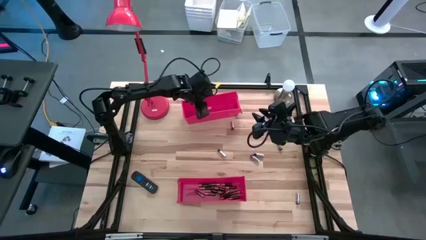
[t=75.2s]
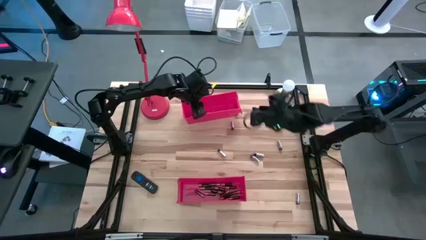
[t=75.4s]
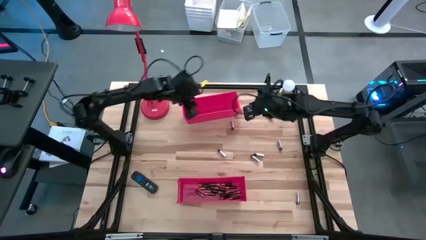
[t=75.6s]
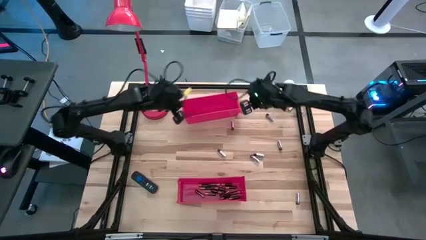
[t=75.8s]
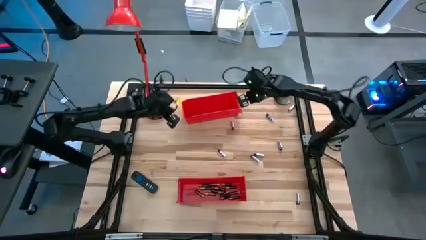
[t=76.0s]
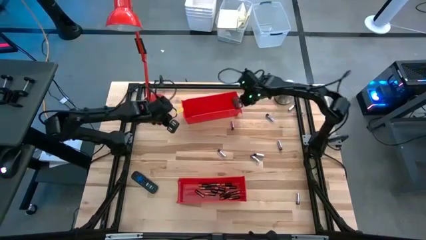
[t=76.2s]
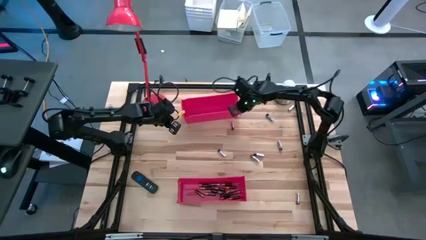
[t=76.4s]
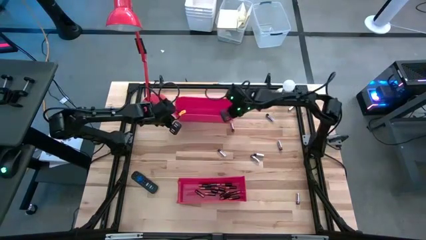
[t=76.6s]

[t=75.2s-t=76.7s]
Task: Sort batteries
Adjust the top red bin

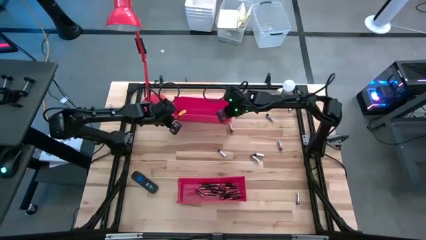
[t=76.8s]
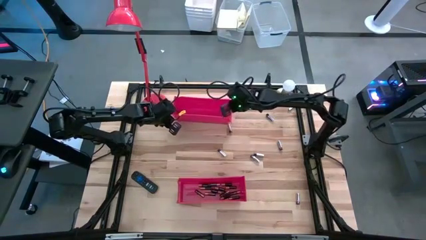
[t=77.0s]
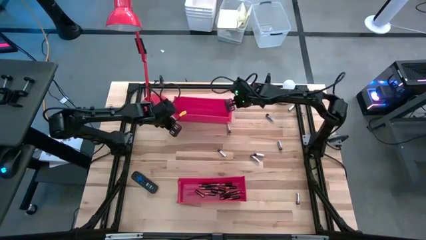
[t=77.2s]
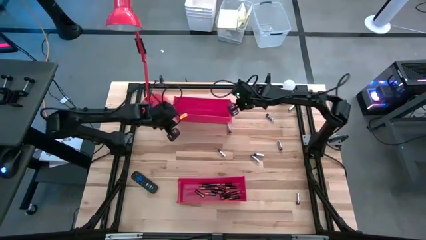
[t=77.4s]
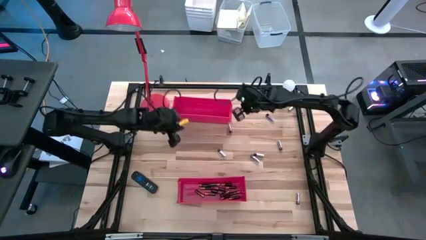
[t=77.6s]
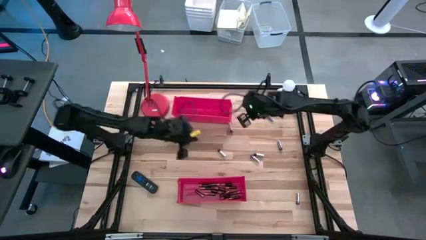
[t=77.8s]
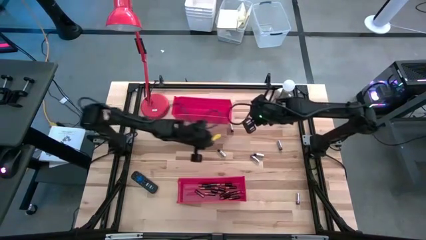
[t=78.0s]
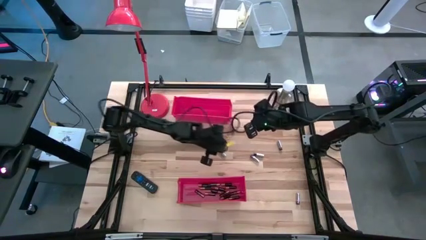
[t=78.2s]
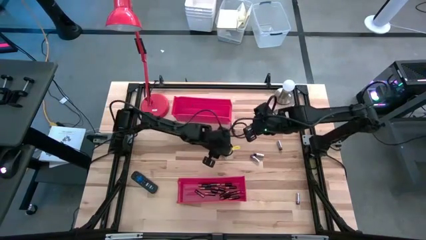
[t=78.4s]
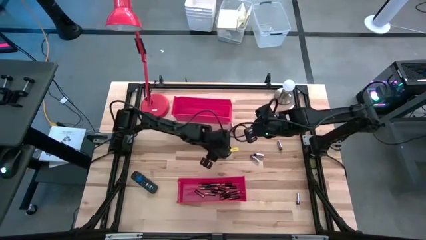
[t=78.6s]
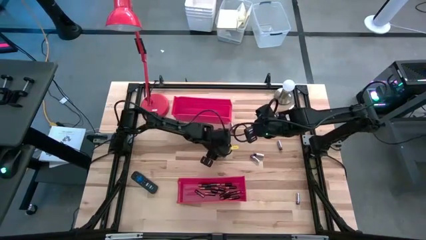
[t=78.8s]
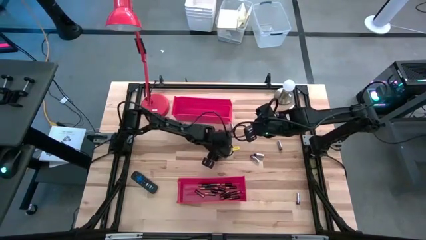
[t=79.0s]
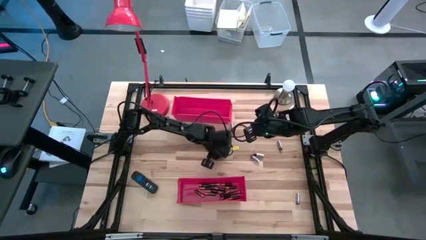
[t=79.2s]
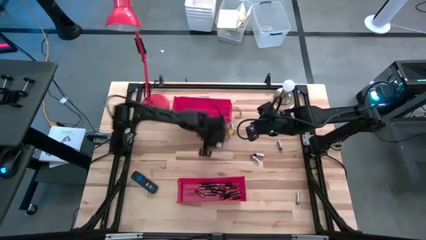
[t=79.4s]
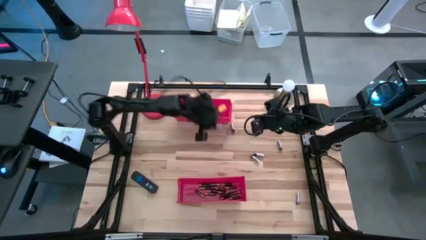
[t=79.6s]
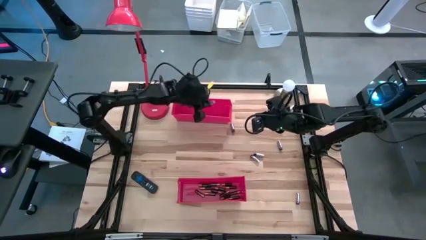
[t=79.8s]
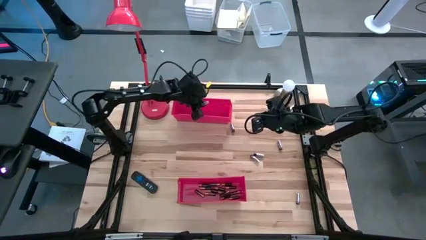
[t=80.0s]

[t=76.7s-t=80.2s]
Put the silver battery into the top red bin

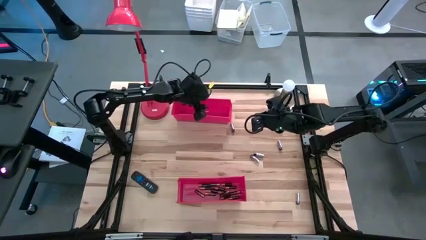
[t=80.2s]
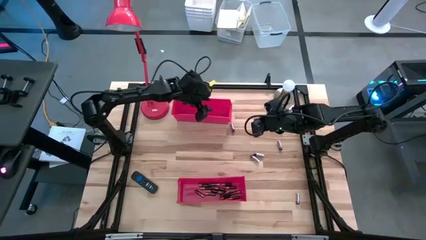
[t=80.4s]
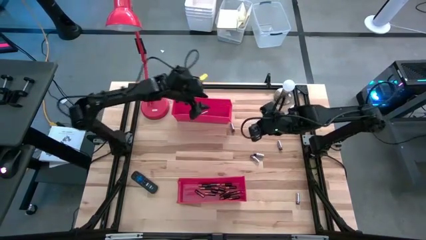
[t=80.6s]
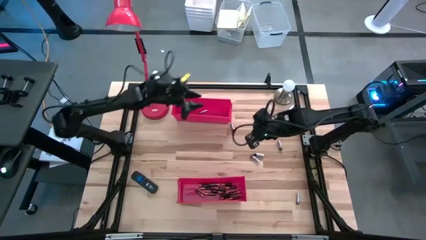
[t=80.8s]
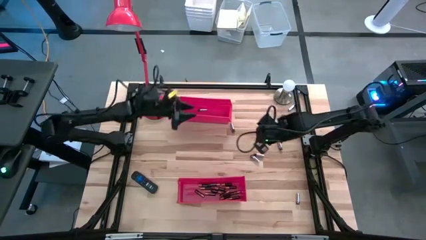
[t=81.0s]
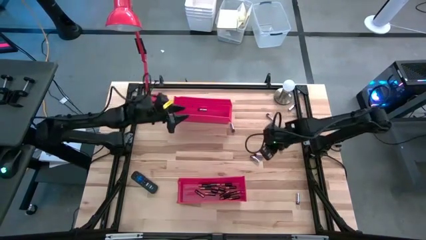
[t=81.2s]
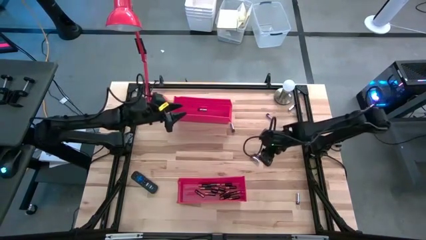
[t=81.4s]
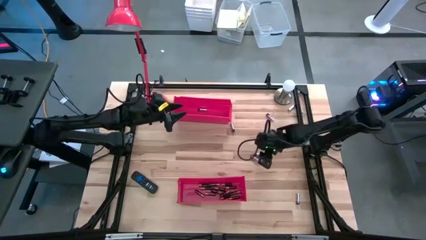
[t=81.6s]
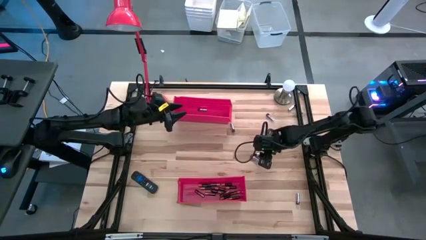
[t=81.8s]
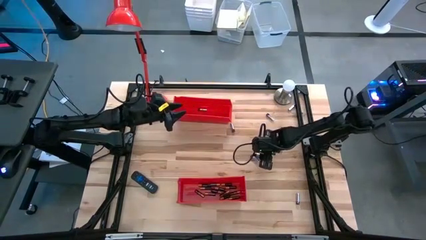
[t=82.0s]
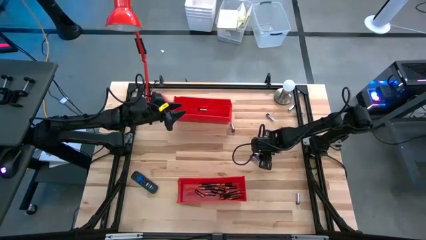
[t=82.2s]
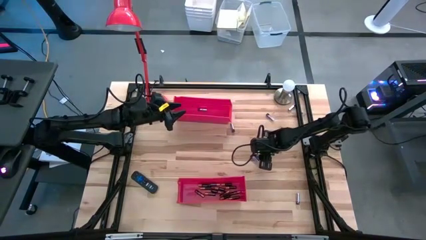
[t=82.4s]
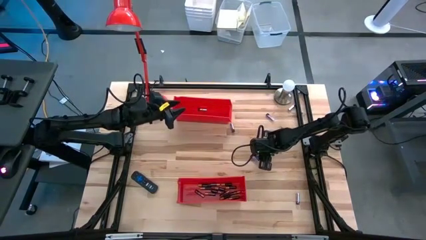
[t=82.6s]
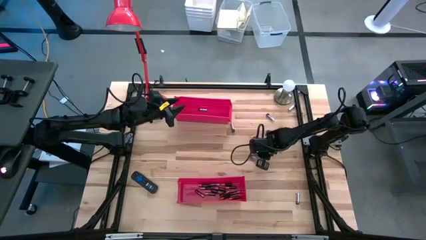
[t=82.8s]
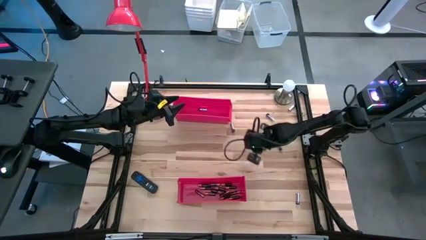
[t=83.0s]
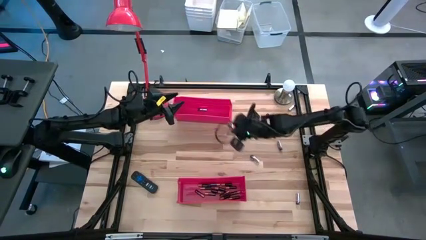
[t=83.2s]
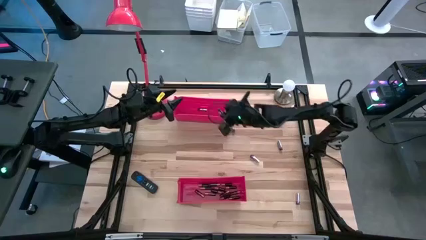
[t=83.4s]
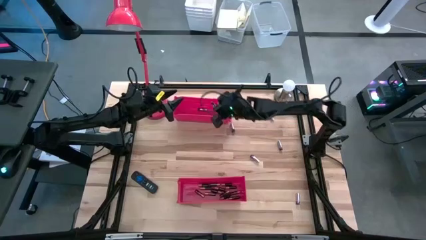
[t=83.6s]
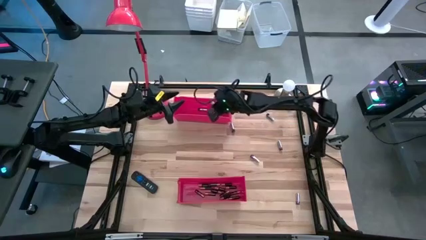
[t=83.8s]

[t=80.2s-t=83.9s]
Put the silver battery into the top red bin

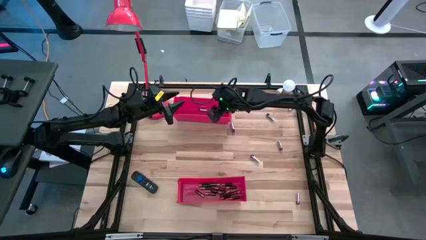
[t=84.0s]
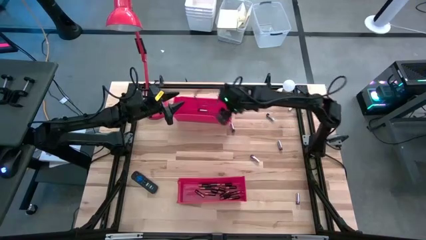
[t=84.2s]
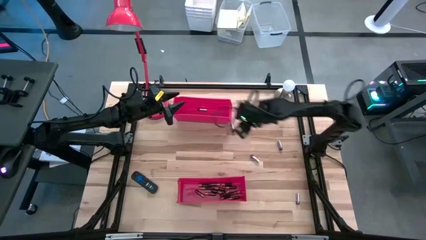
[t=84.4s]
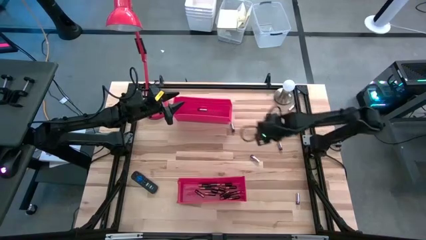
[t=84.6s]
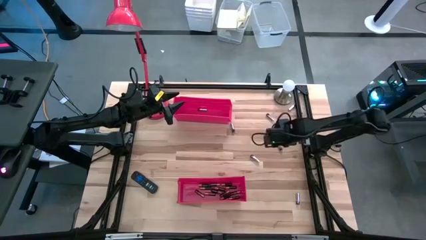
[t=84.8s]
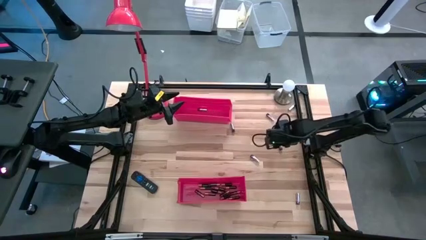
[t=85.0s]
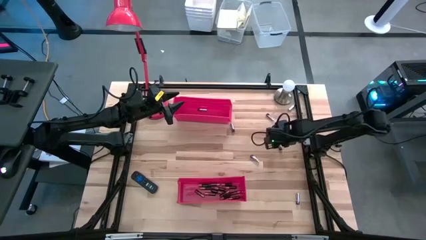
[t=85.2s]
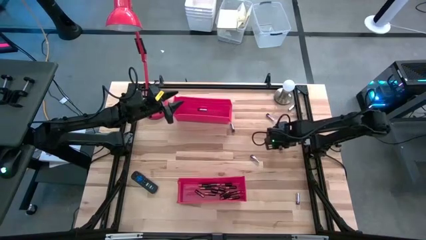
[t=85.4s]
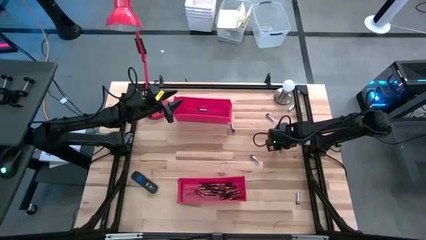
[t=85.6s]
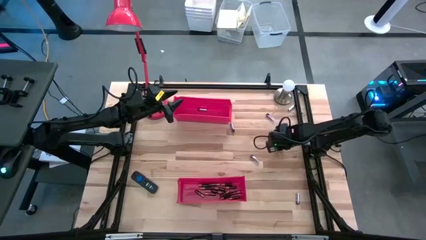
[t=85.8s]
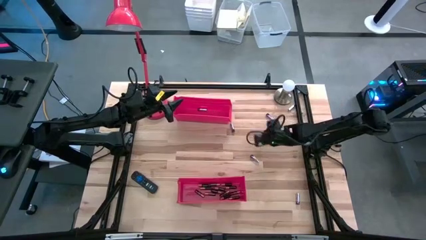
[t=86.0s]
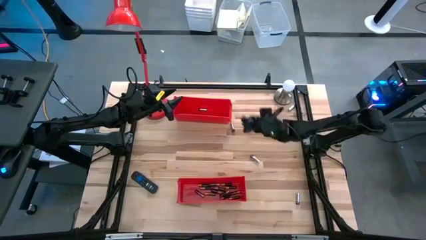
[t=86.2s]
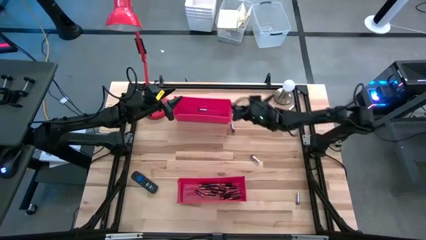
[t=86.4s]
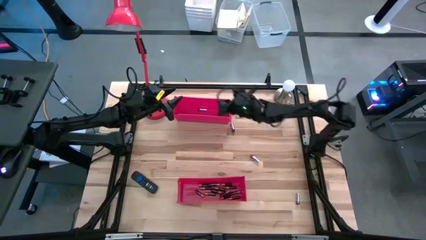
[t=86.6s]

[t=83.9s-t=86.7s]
Put the silver battery into the top red bin

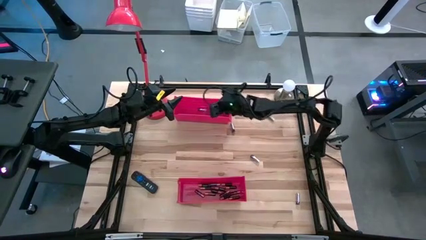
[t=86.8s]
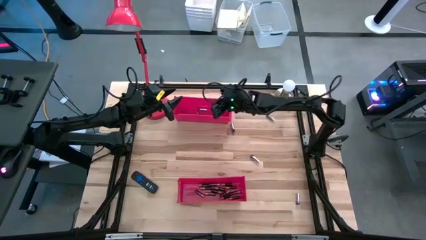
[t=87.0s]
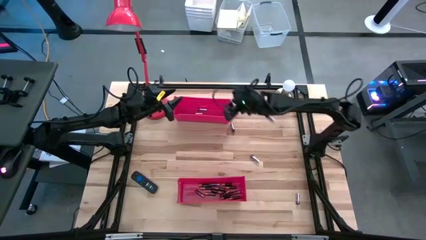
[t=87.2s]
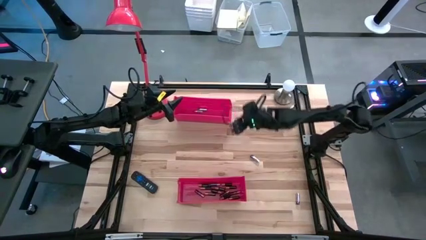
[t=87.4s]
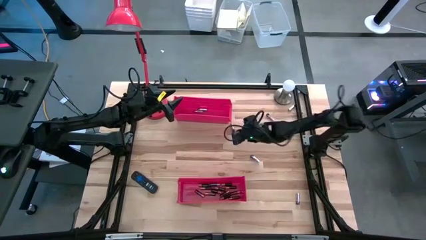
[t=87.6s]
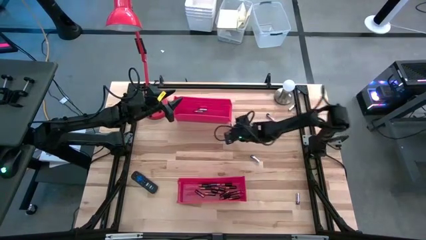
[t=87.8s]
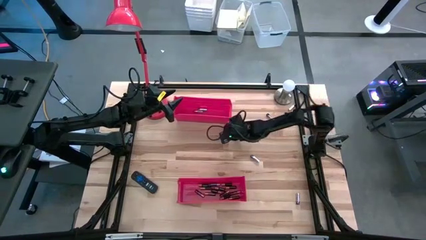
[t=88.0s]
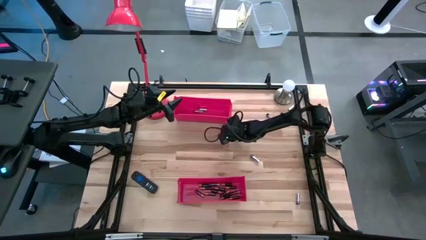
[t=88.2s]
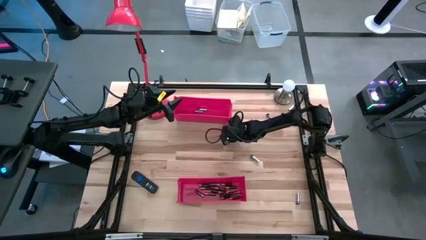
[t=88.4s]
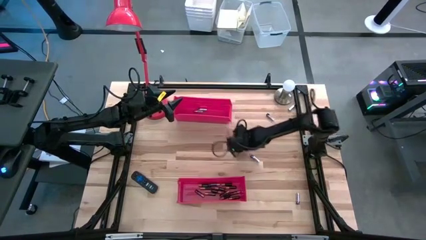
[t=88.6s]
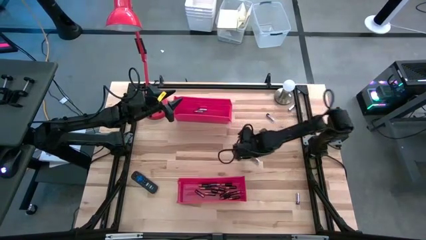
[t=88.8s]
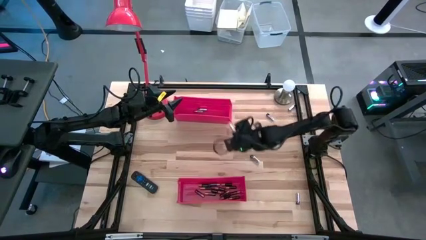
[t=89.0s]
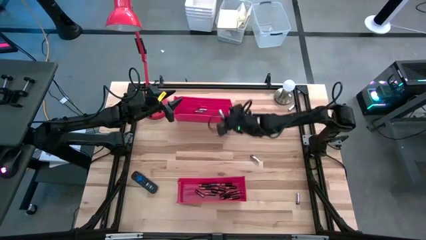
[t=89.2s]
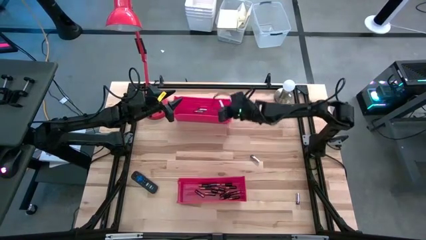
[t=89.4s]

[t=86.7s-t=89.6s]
Put the silver battery into the top red bin

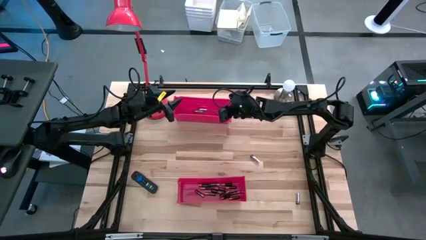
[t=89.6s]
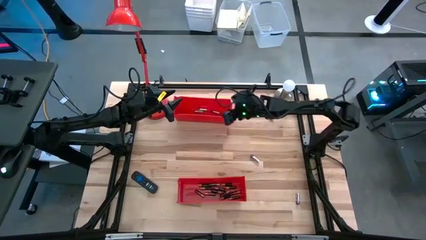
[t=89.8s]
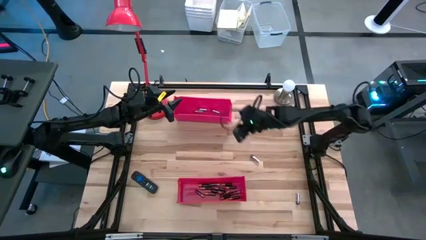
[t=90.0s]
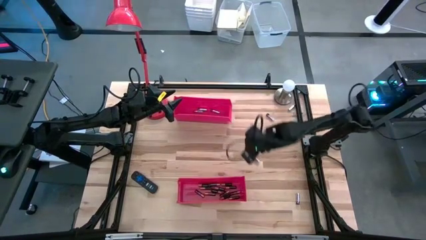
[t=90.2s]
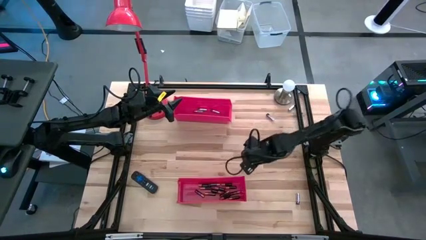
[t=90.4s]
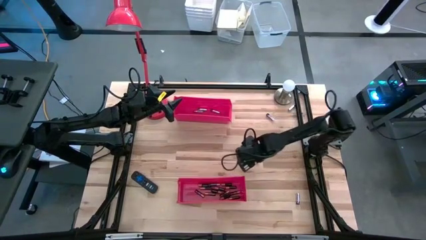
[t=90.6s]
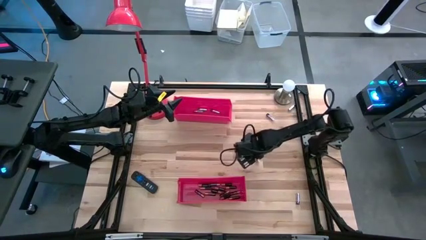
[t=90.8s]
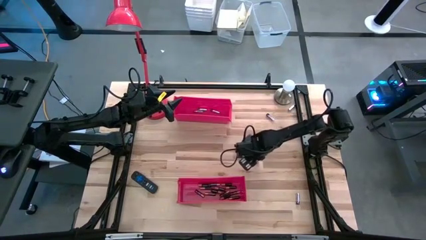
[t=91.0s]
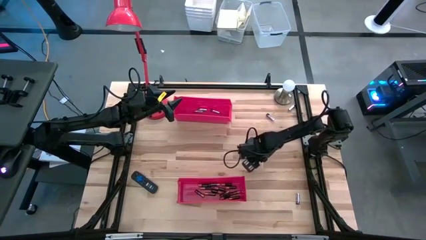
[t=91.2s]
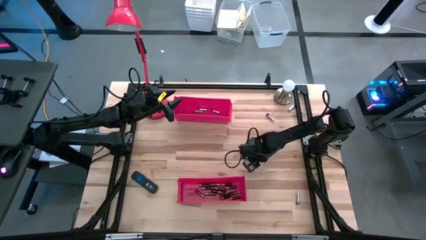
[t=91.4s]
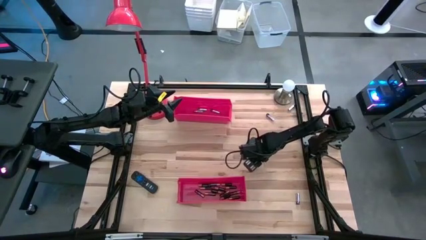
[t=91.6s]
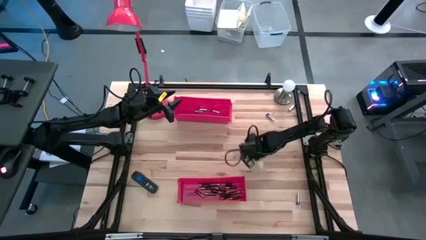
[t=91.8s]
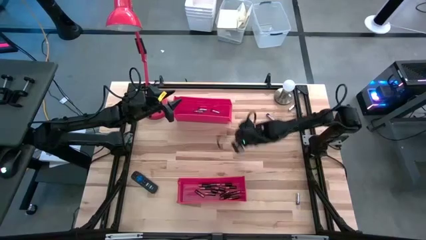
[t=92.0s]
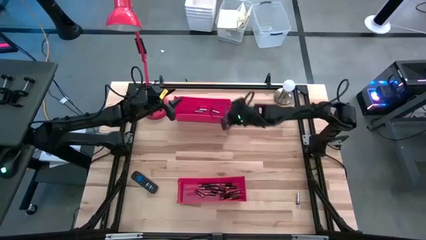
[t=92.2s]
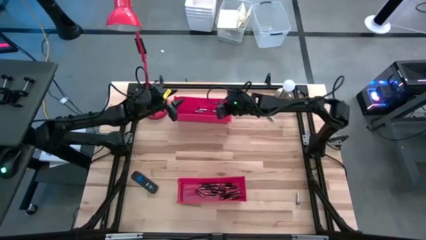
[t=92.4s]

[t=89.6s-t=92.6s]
Put the silver battery into the top red bin
